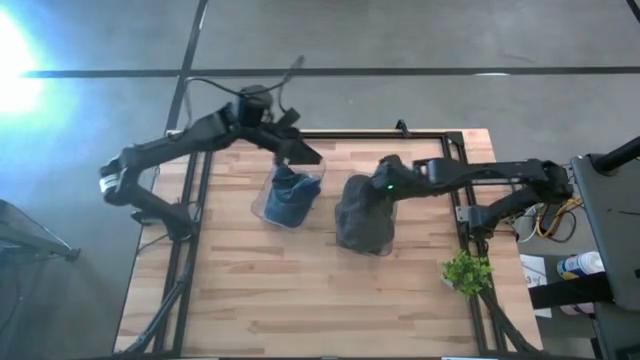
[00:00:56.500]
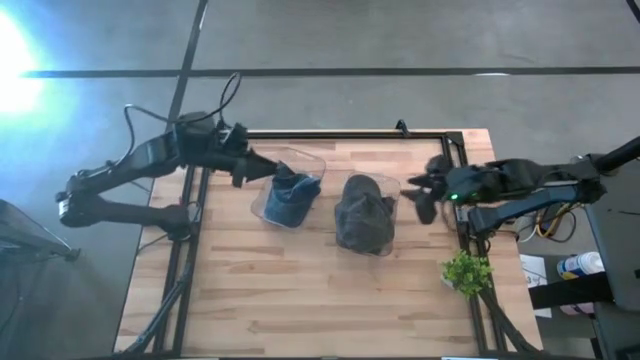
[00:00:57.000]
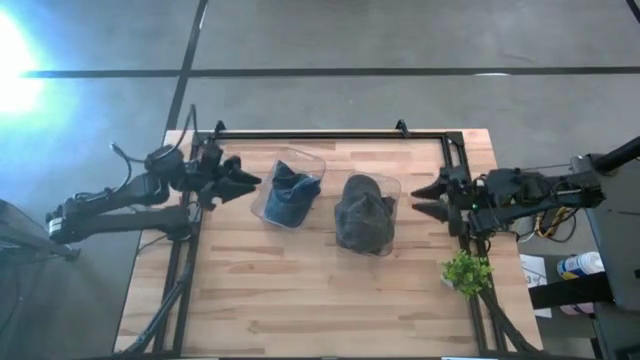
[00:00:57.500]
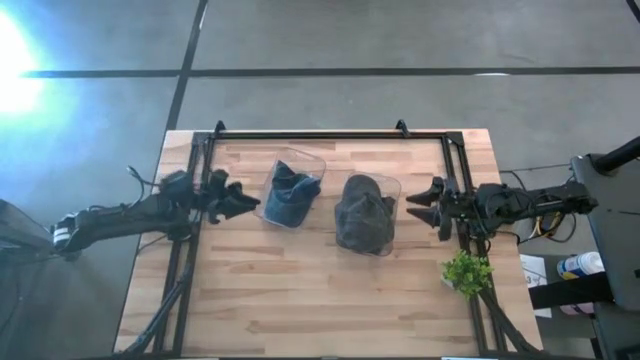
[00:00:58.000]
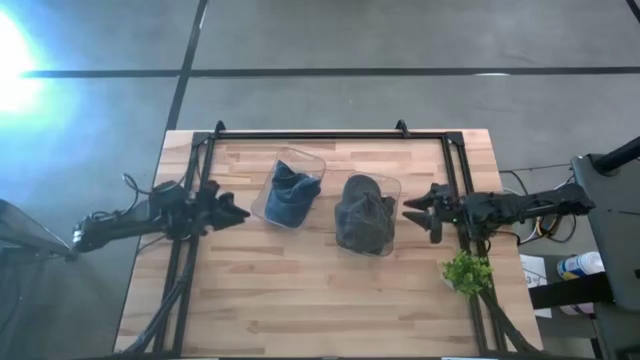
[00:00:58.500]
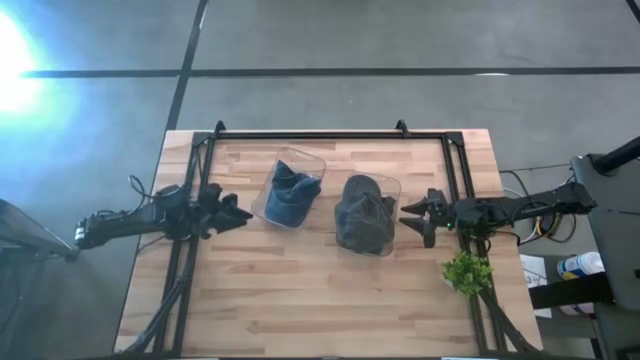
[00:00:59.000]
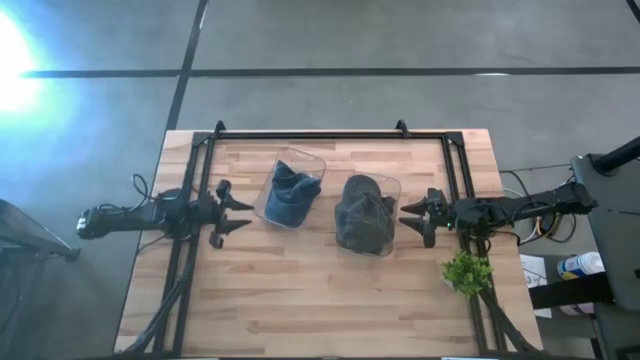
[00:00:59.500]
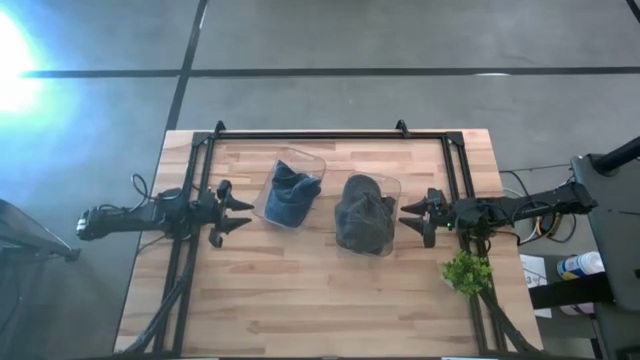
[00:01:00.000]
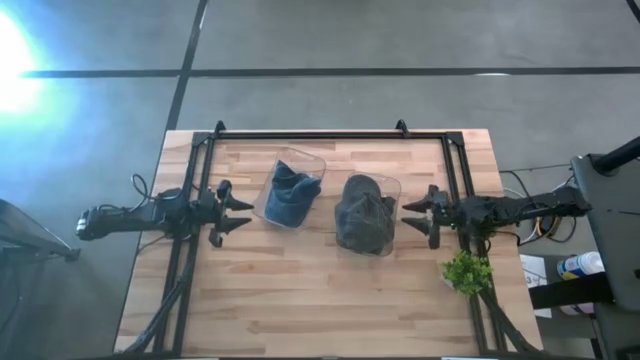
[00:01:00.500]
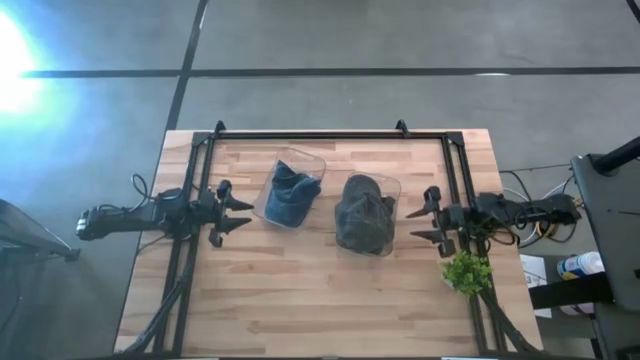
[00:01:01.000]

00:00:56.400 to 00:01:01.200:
Task: Pick & Place hat
Return to Home Position

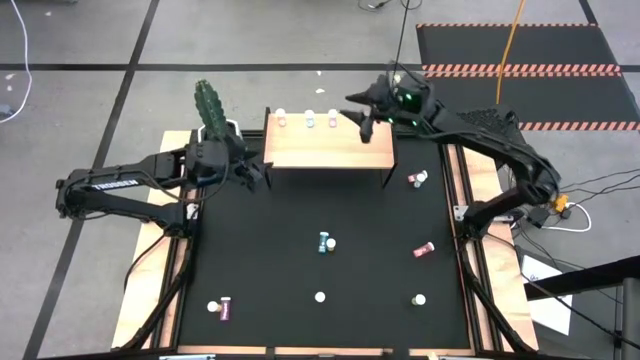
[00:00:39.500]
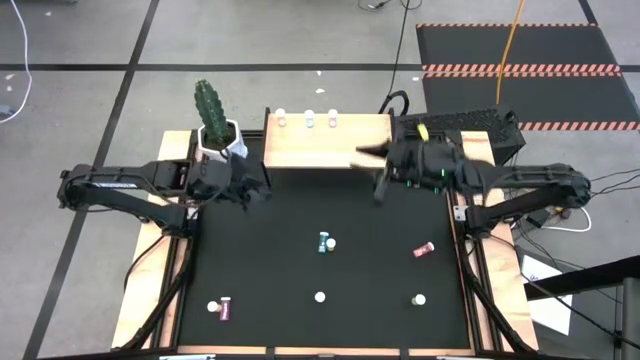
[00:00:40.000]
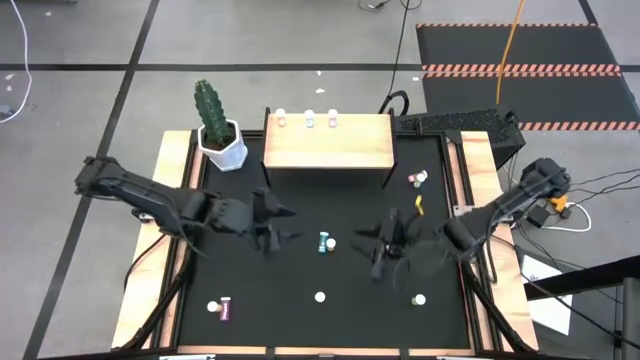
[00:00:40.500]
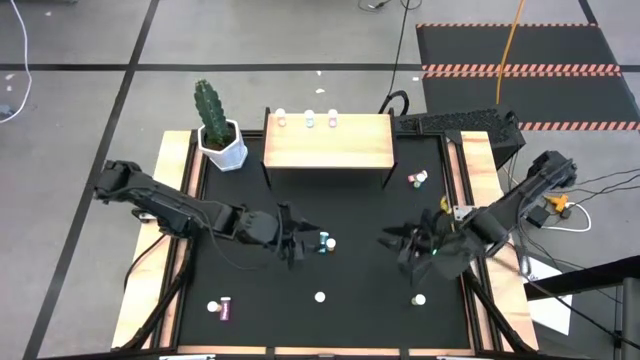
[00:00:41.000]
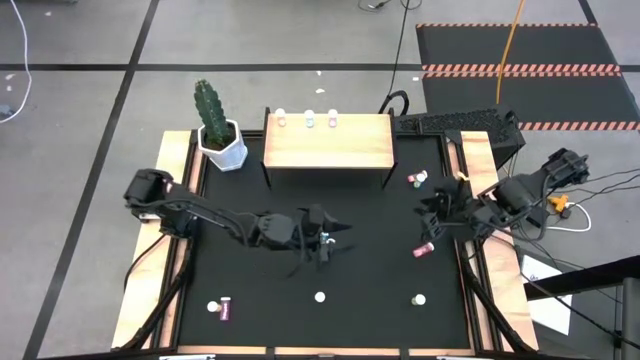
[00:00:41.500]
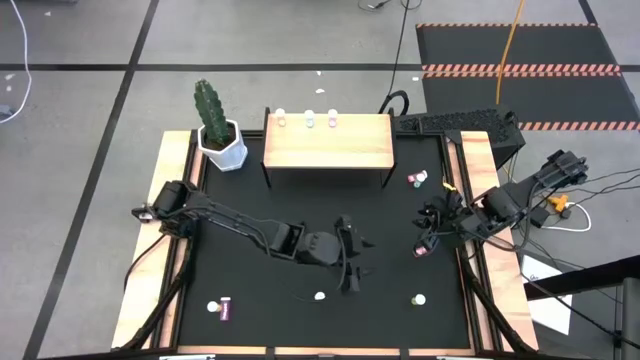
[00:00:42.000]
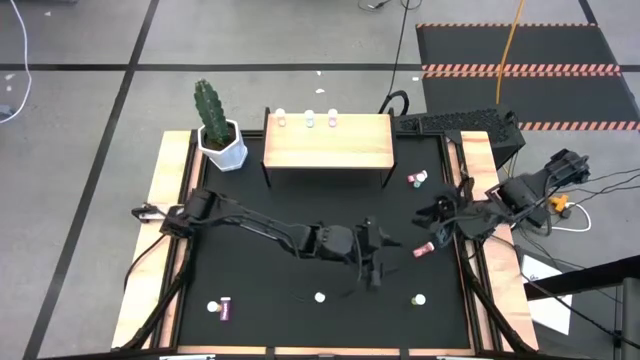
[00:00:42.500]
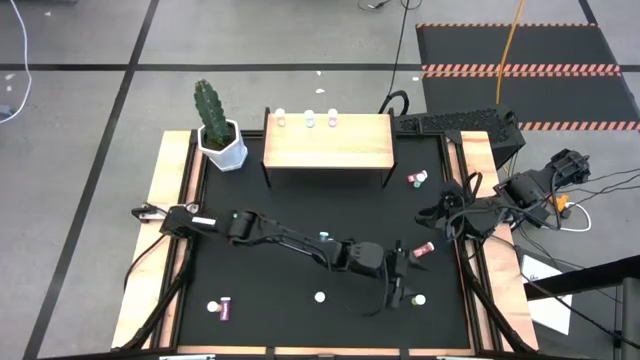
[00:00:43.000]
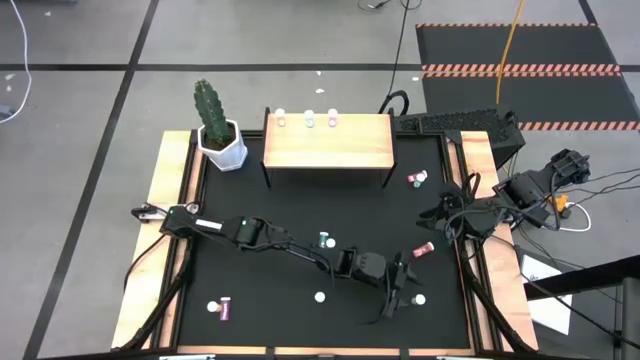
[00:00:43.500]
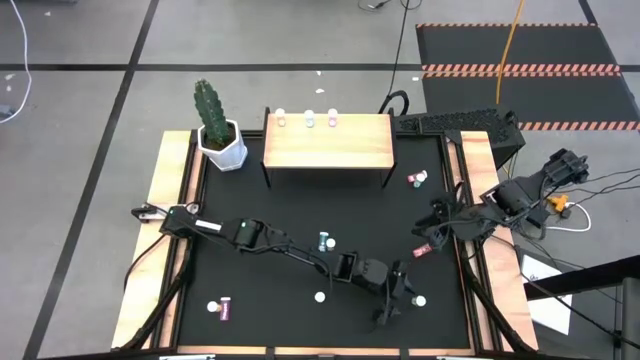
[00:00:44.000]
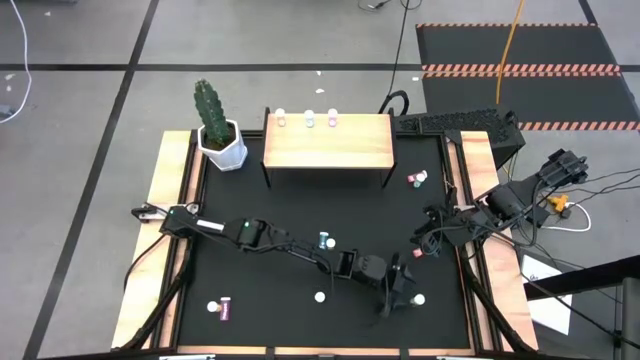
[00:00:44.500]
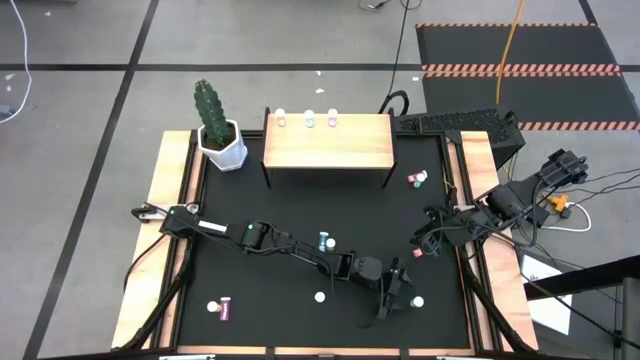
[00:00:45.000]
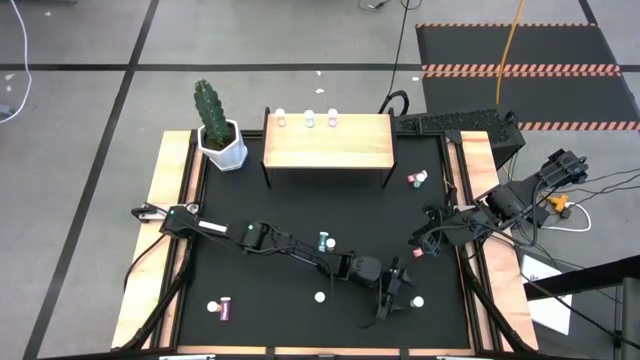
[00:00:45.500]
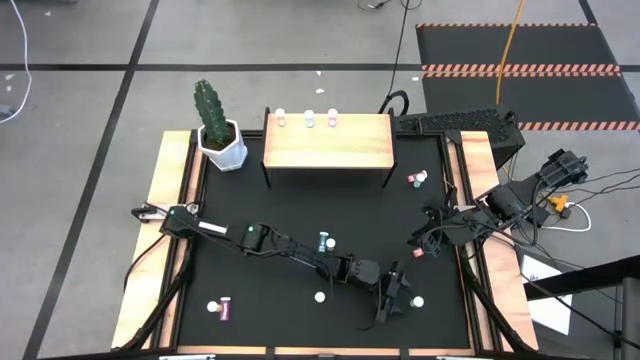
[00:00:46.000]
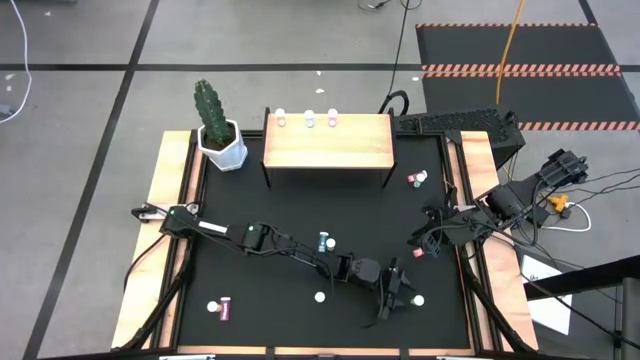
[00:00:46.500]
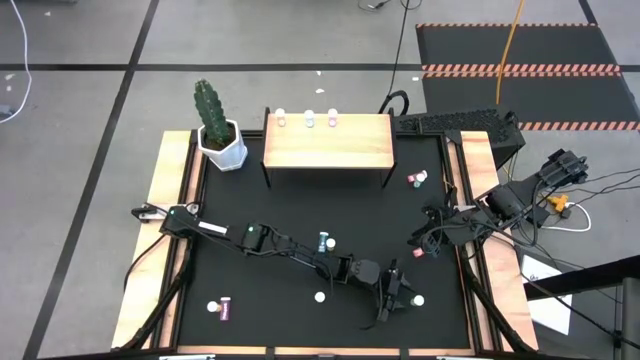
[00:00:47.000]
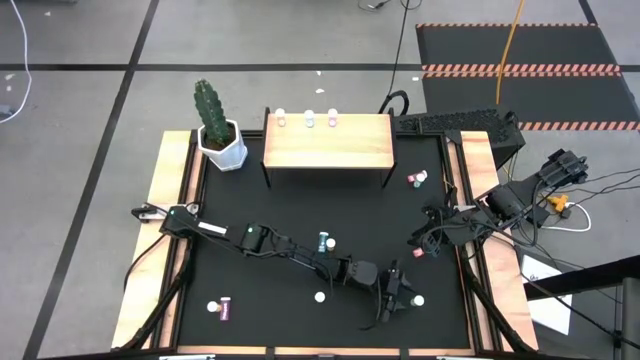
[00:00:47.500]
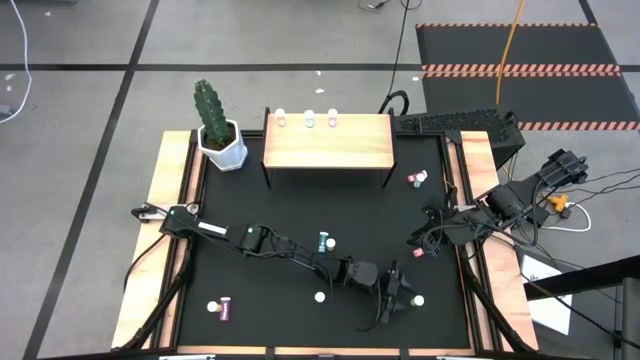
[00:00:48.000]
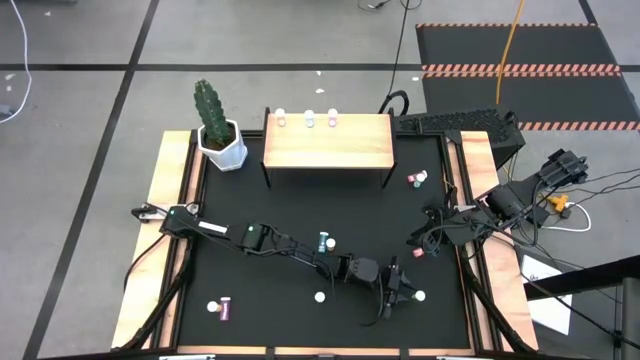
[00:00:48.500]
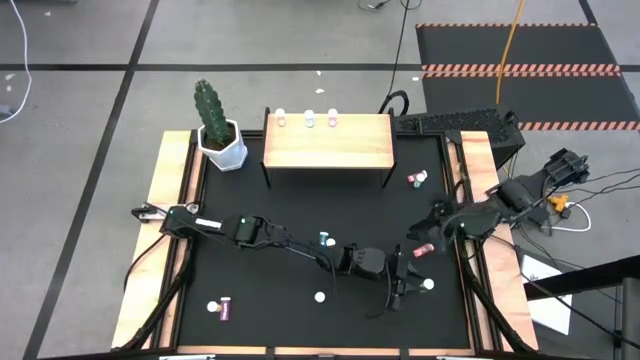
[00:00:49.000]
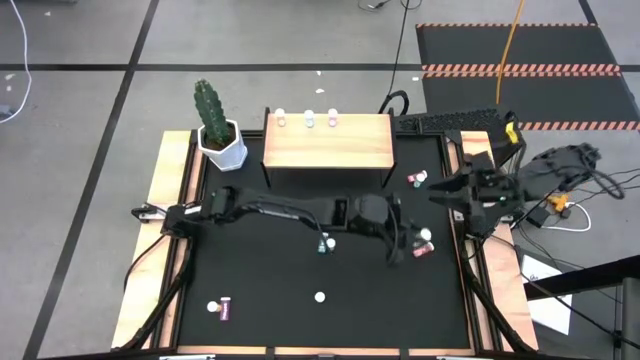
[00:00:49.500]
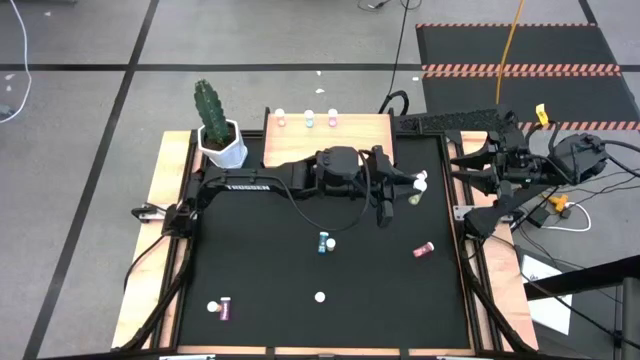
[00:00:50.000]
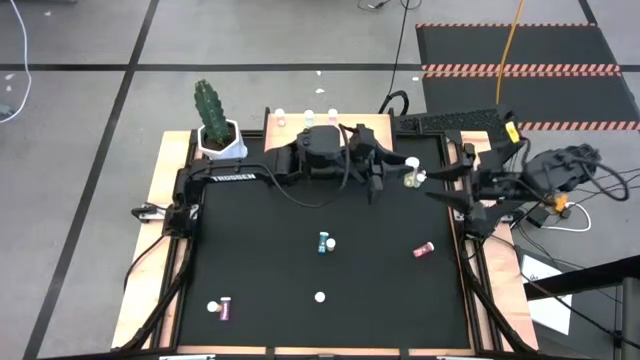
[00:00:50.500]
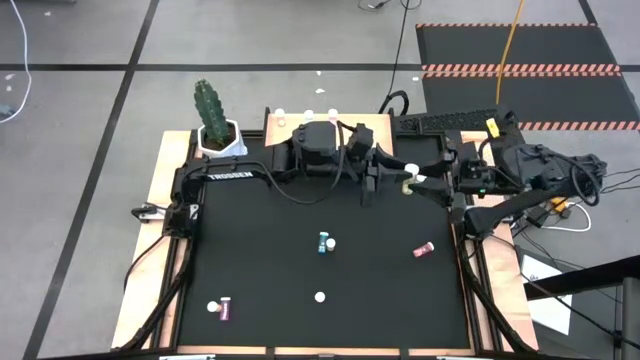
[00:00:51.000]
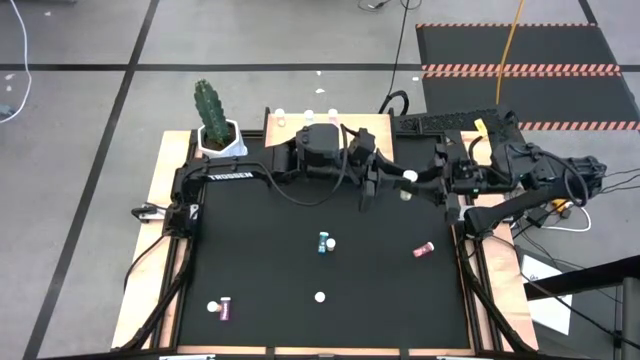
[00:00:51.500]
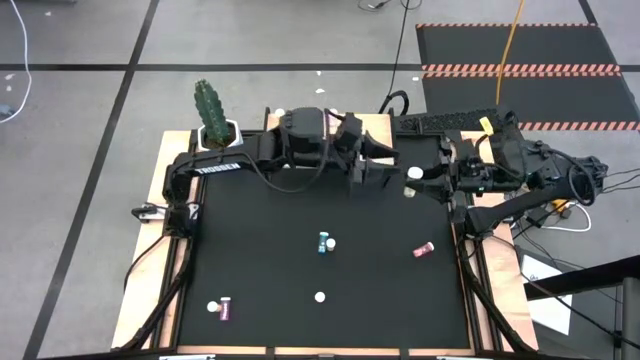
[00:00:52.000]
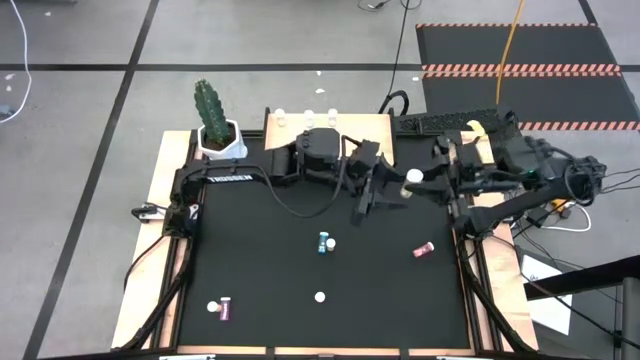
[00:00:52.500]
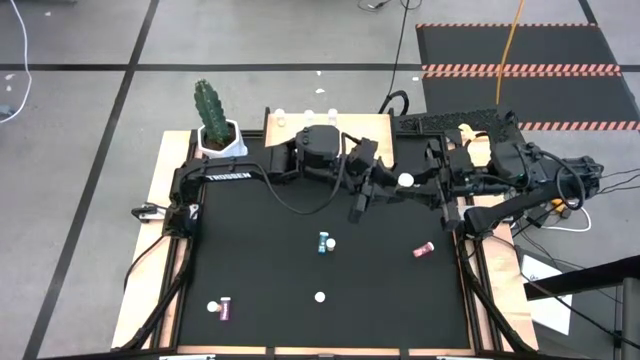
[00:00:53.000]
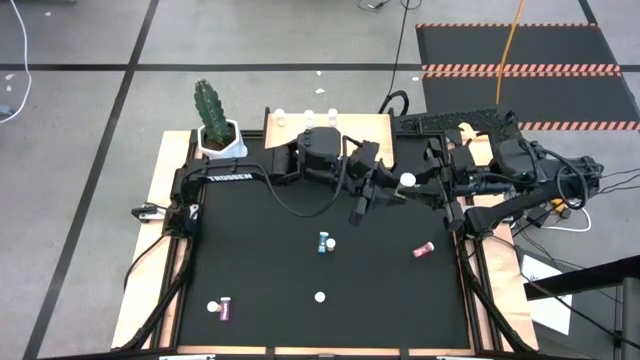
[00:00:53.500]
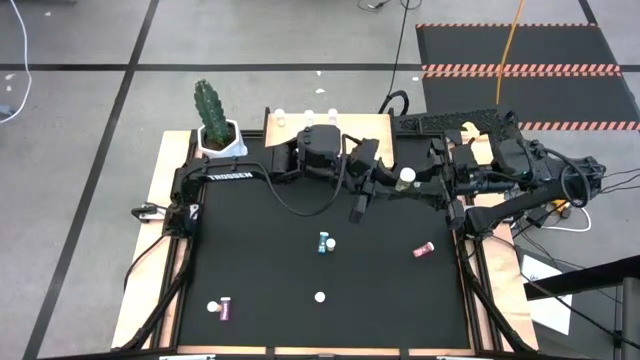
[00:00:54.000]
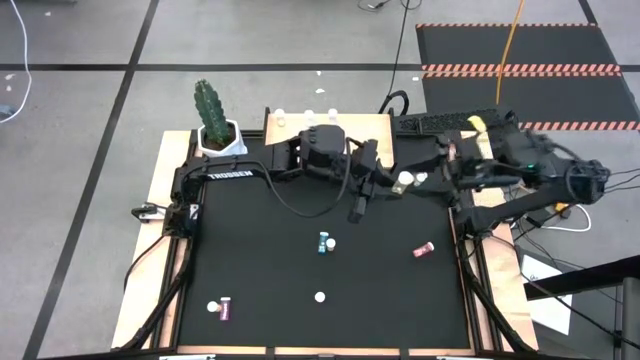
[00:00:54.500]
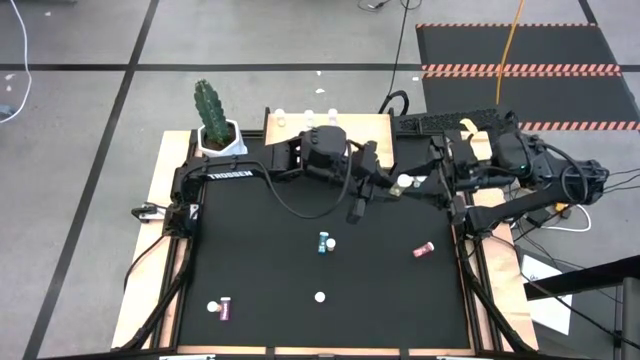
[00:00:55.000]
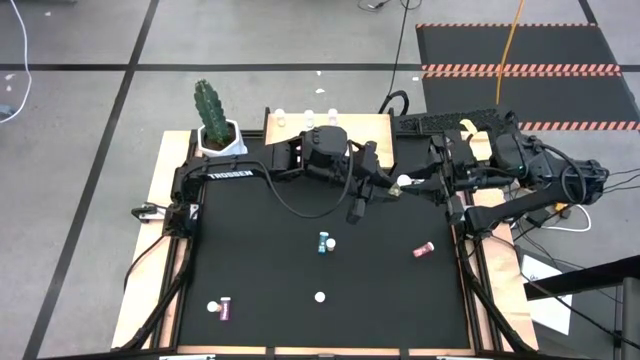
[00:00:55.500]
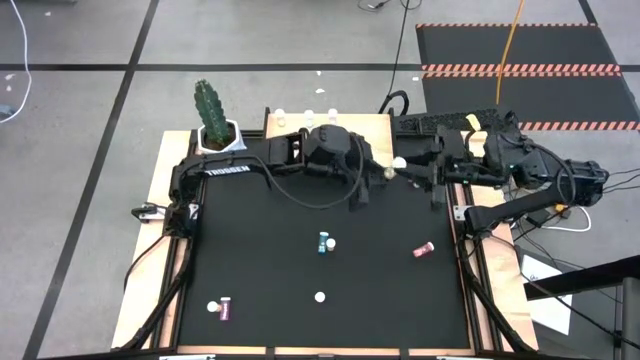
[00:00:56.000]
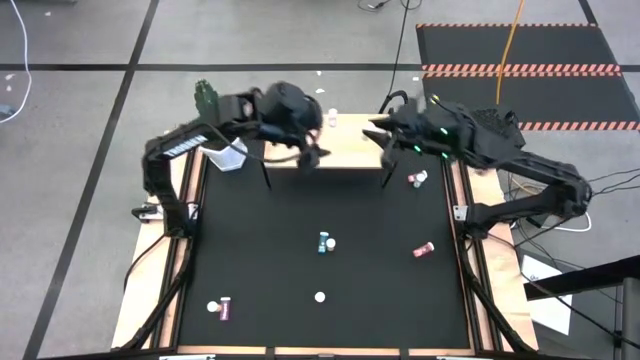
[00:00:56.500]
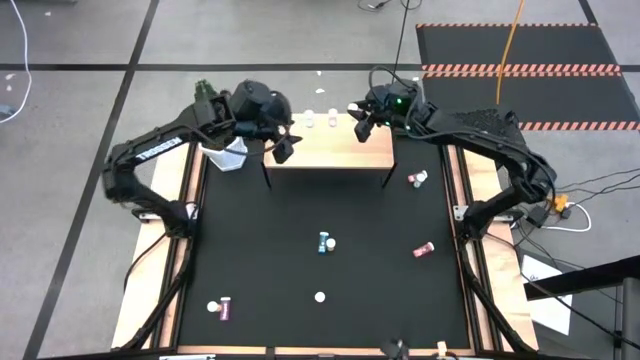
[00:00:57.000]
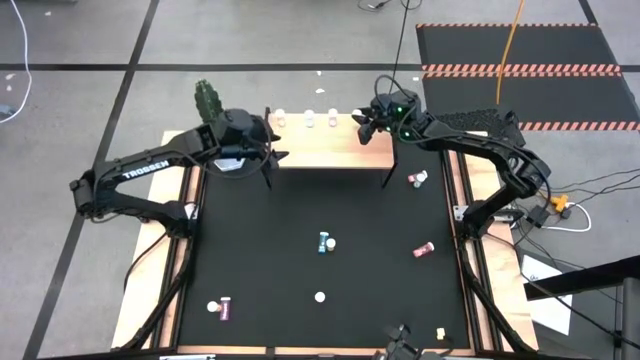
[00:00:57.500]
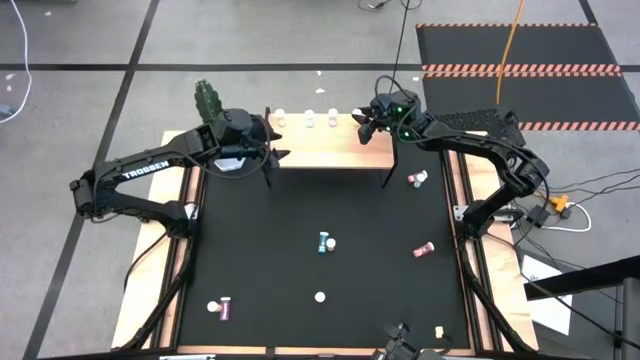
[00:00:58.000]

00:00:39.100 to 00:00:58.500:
Task: Pick and place medicine bottles onto shelf by color
Put the bottom right yellow pill bottle on the shelf
